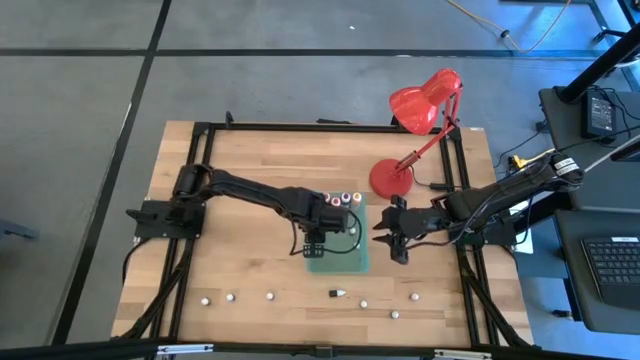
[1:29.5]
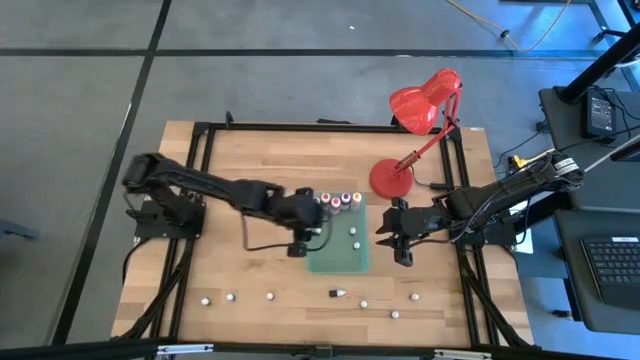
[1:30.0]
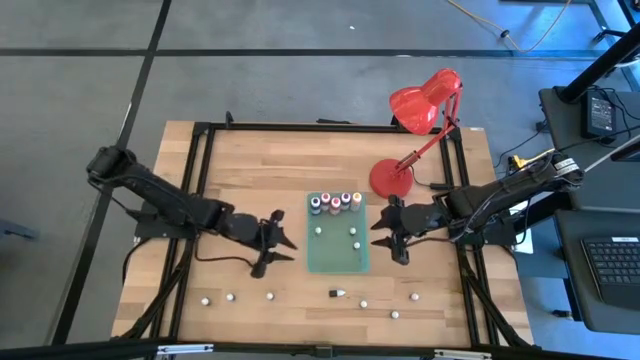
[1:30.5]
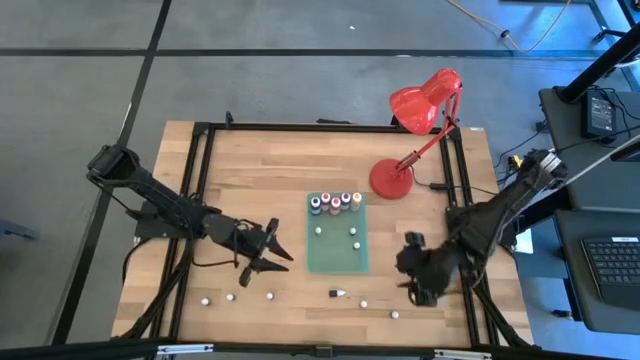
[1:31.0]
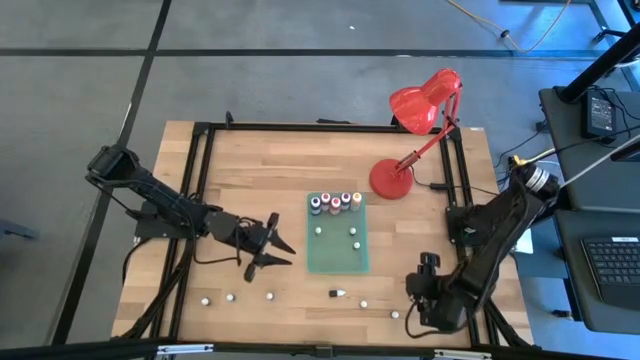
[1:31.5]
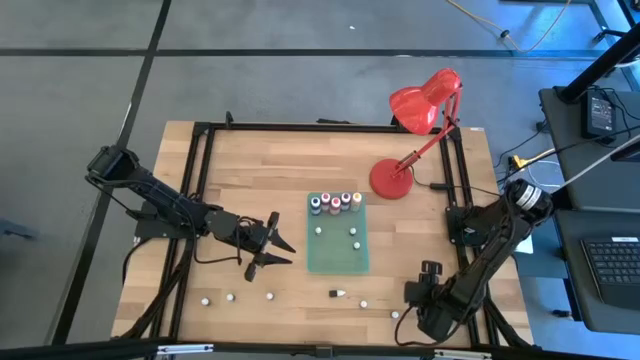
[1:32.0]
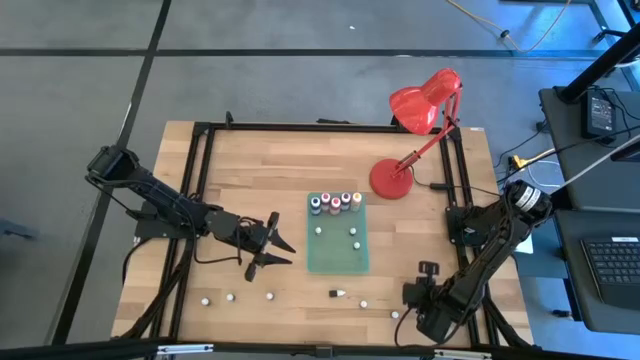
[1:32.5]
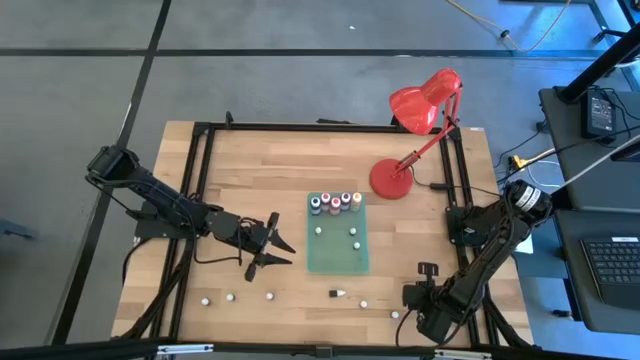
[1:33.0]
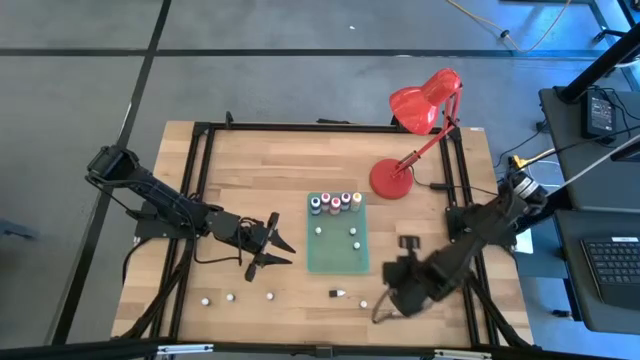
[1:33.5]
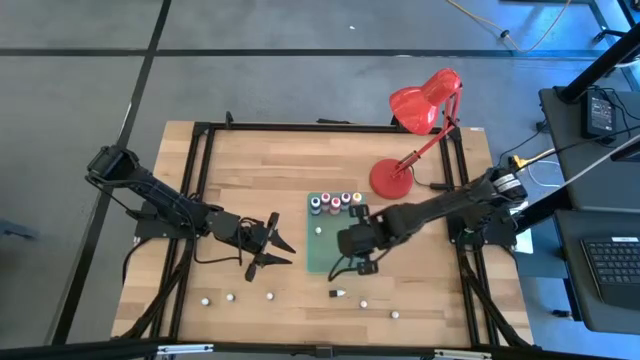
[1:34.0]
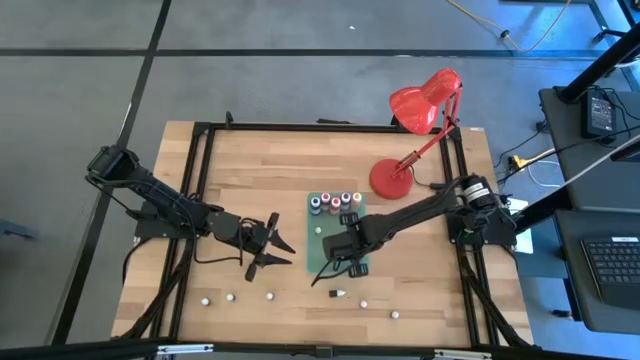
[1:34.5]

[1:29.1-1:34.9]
Task: Pick & Place food coloring
Put the small red food coloring bottle into the green bin

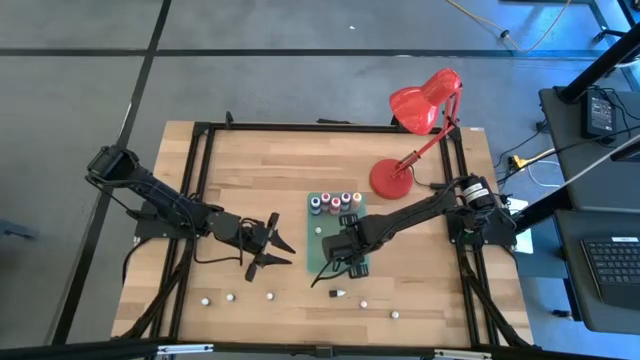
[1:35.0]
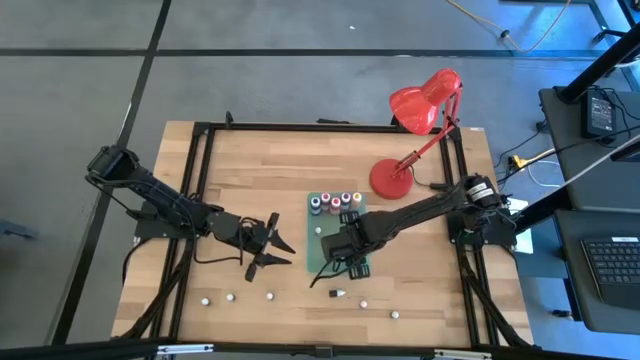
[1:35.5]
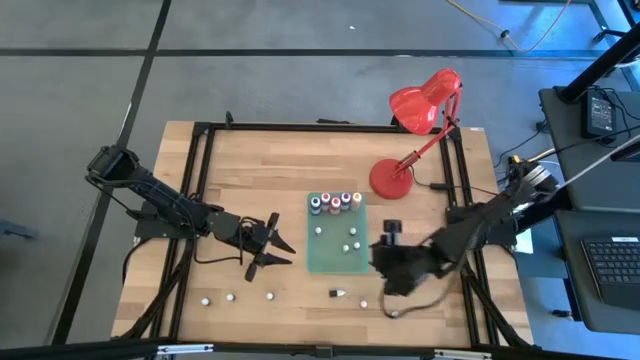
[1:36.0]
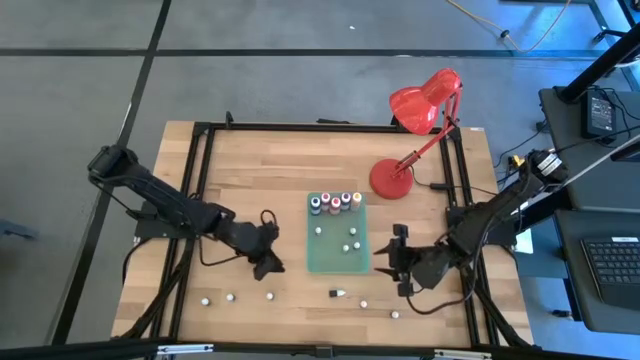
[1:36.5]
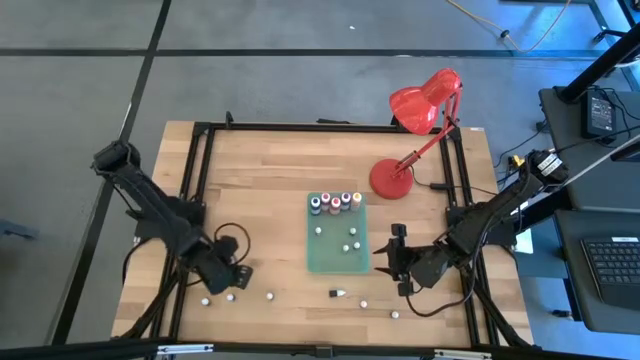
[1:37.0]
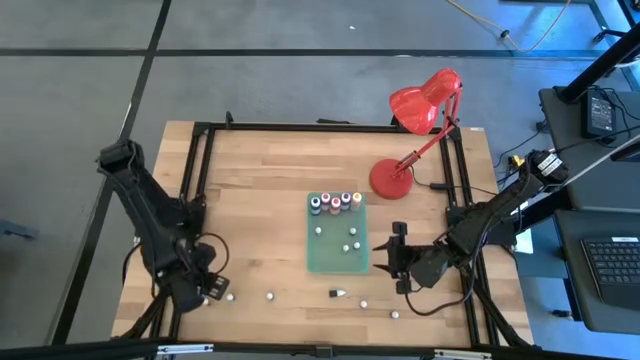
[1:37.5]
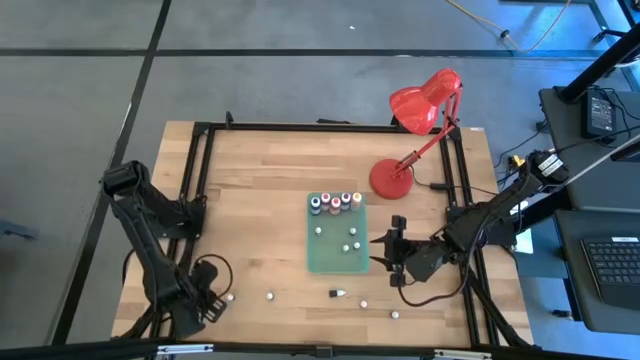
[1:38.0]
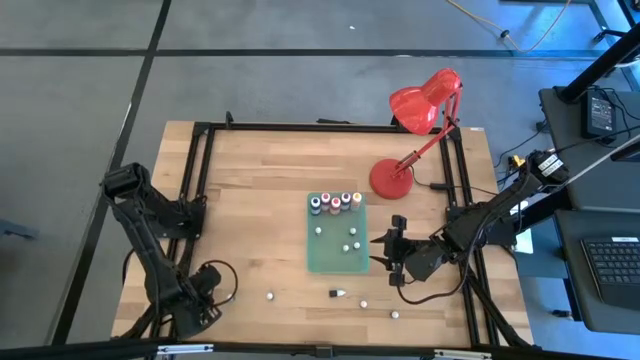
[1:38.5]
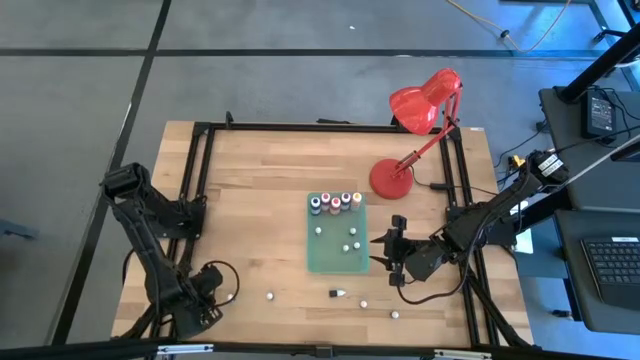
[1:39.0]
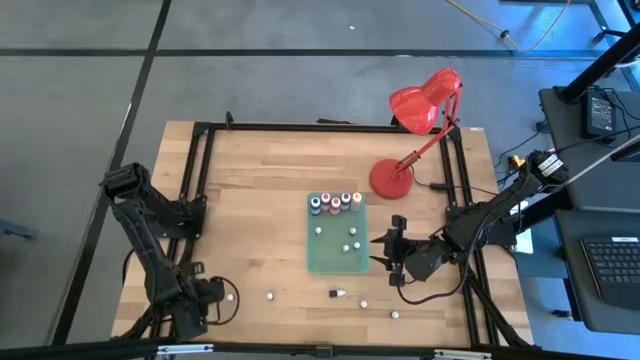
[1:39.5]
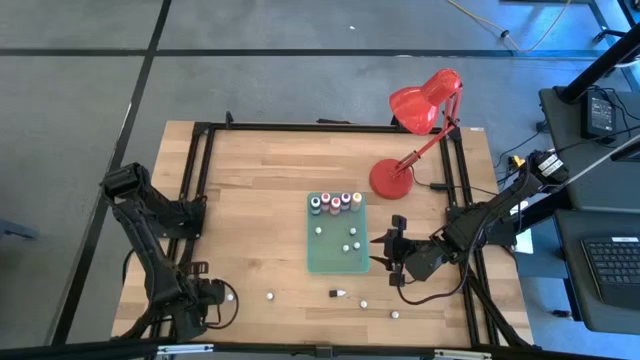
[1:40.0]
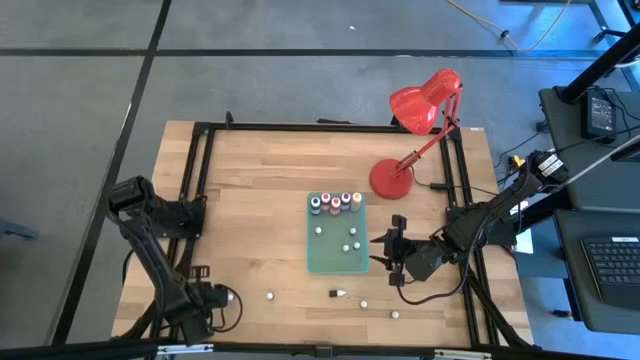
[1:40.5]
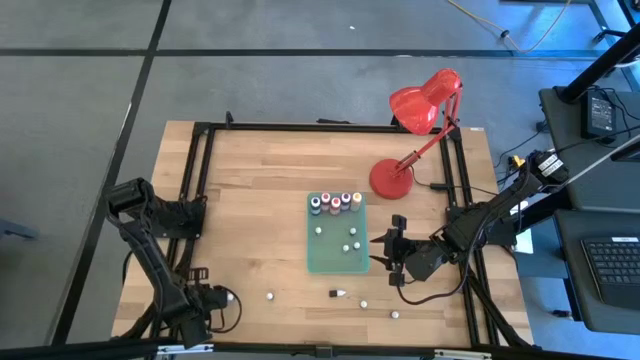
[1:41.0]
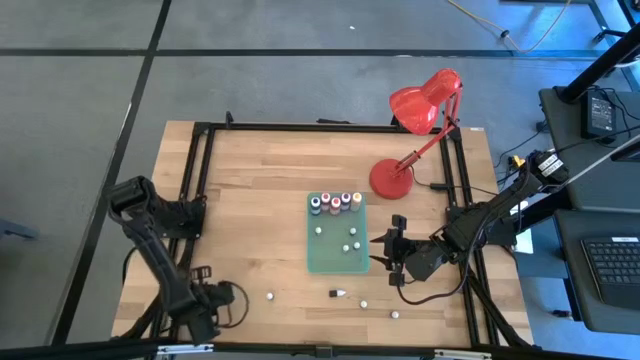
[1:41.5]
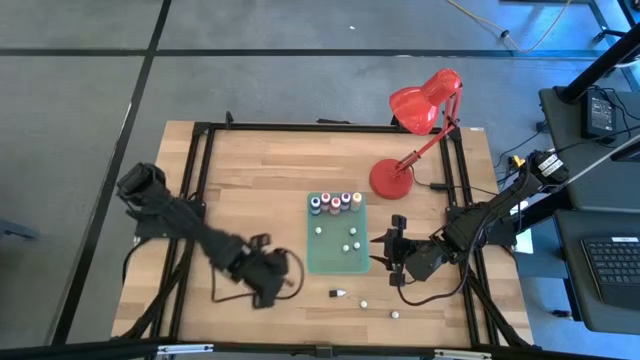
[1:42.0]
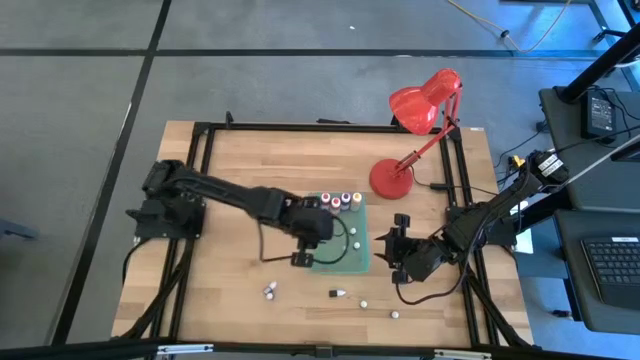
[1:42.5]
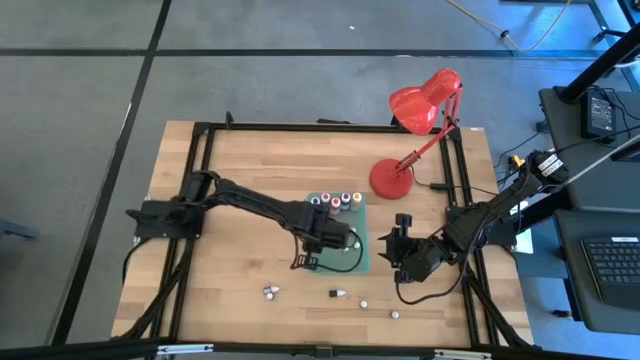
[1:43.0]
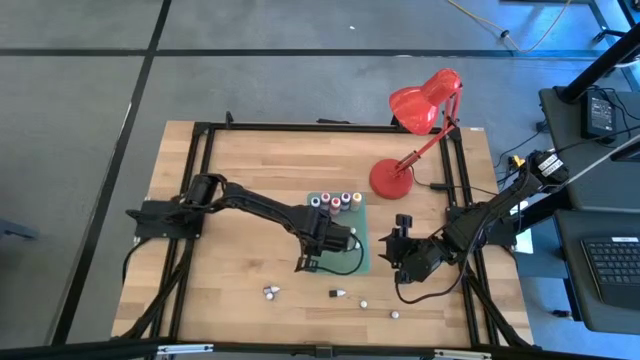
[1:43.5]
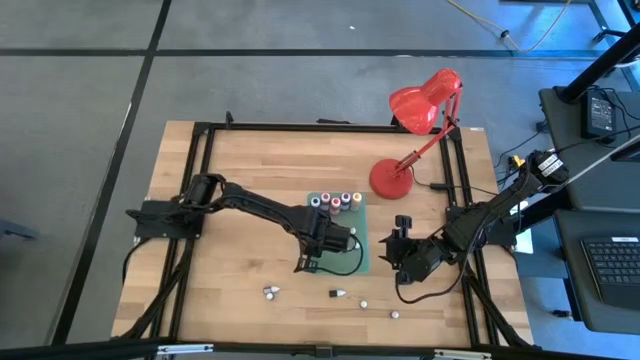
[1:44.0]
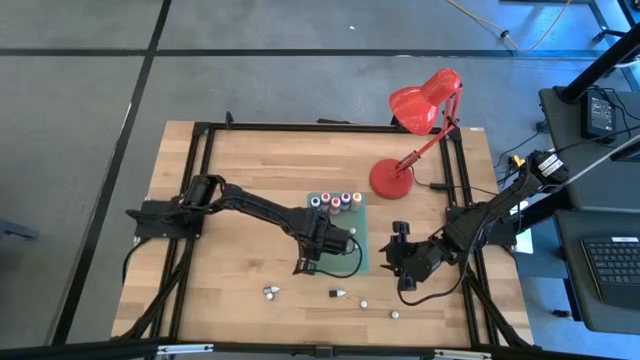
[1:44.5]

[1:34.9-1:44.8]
Put the small green food coloring bottle into the green bin

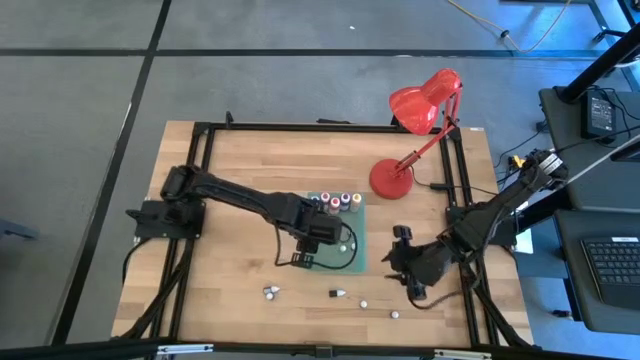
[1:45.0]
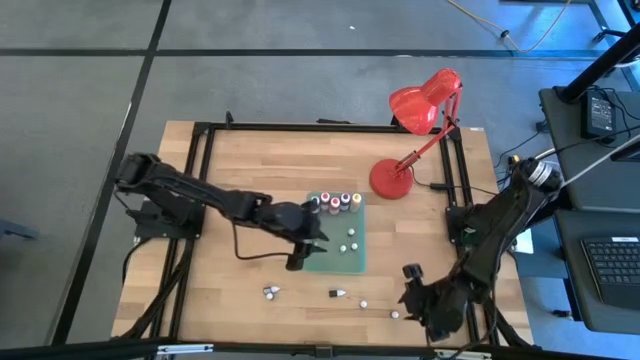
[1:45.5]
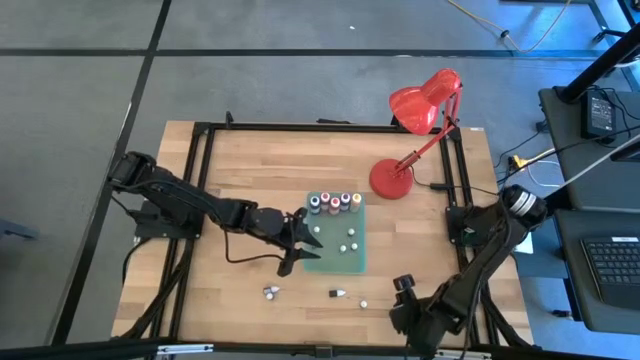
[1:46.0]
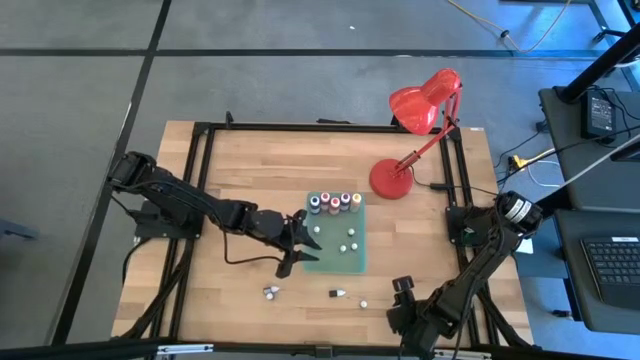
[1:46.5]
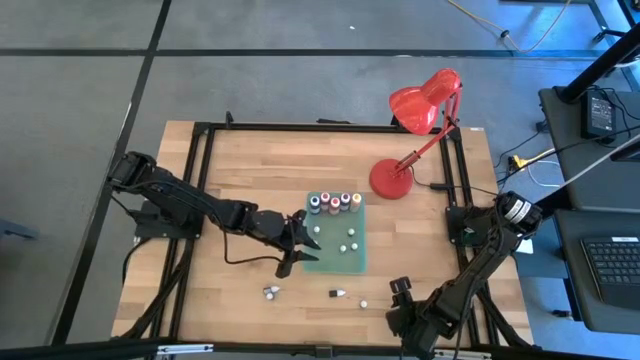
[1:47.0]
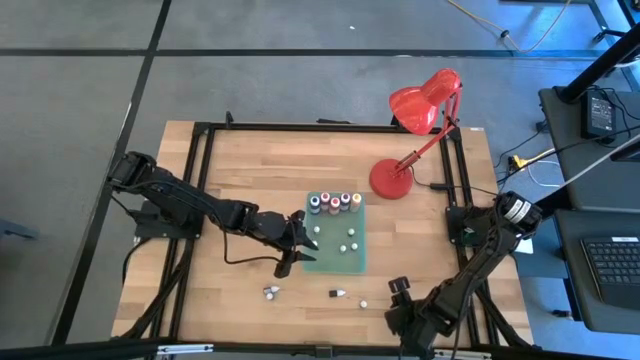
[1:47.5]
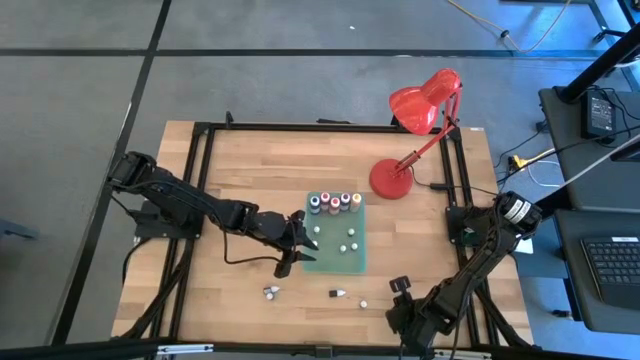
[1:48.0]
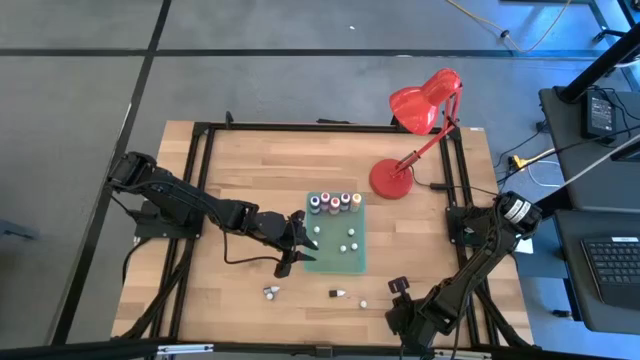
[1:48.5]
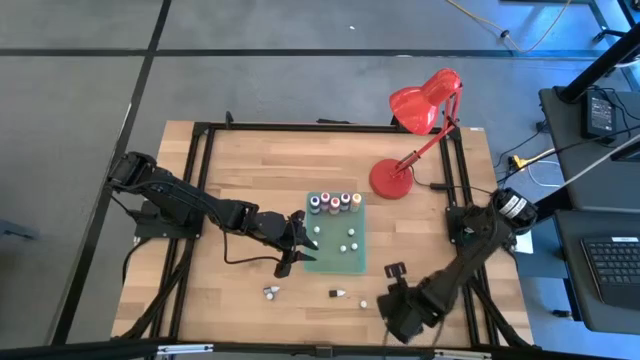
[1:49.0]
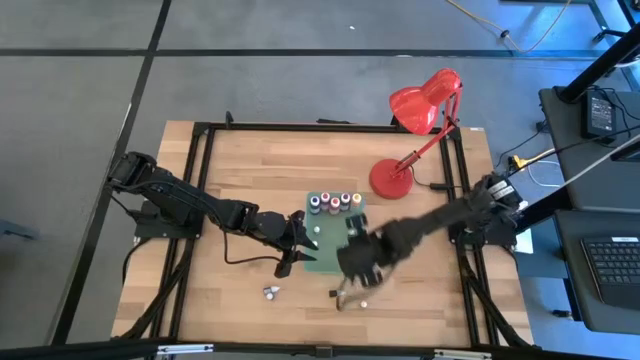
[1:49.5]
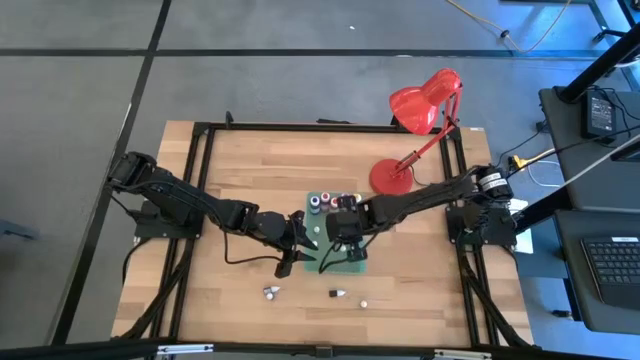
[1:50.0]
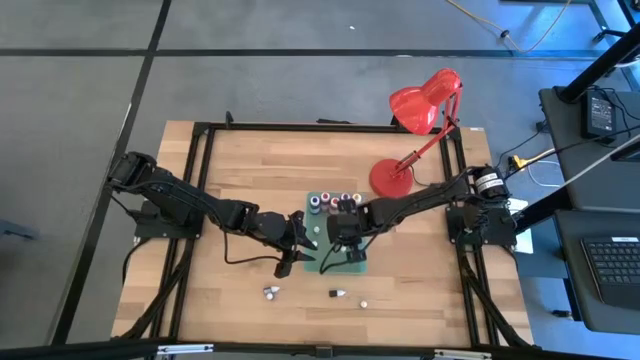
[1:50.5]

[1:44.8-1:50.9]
Put the small blue food coloring bottle into the green bin
